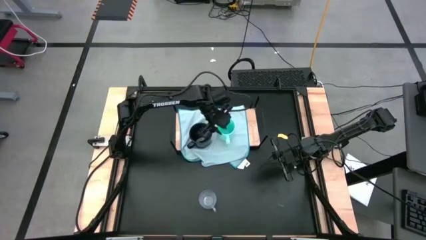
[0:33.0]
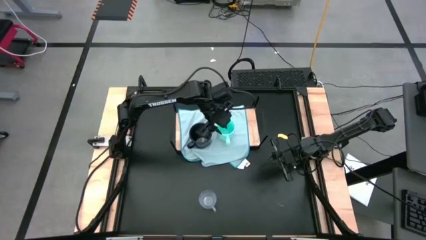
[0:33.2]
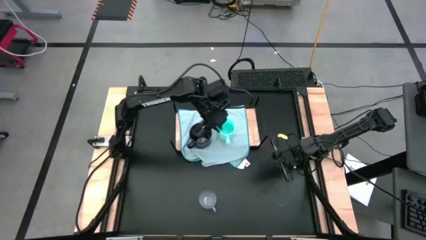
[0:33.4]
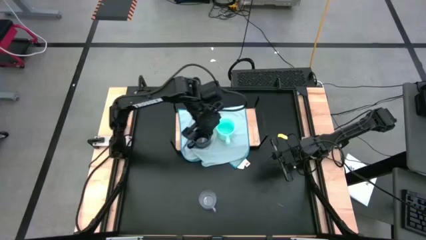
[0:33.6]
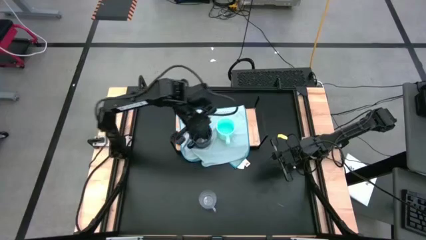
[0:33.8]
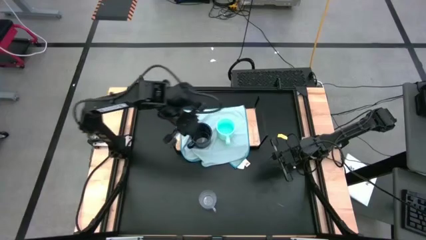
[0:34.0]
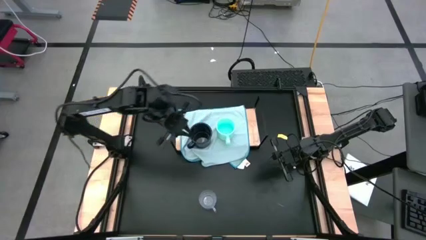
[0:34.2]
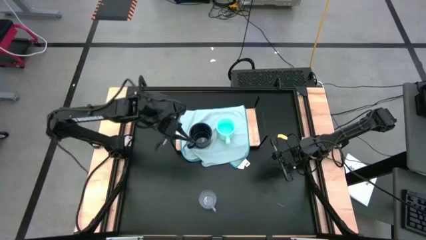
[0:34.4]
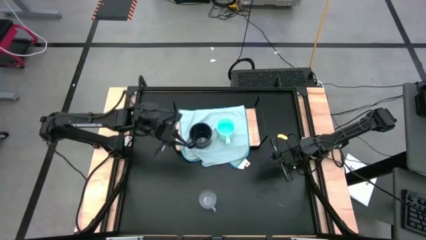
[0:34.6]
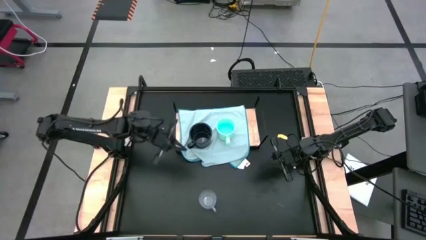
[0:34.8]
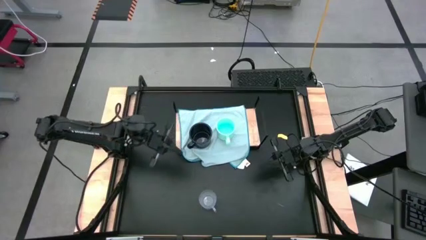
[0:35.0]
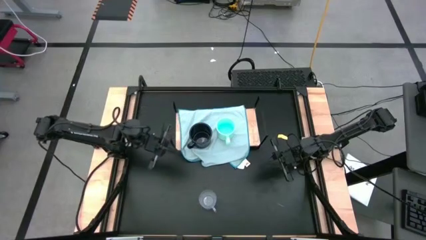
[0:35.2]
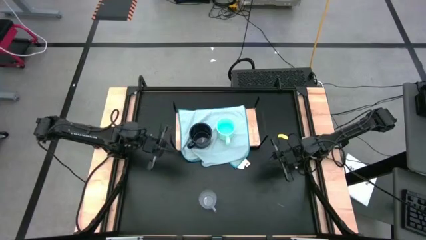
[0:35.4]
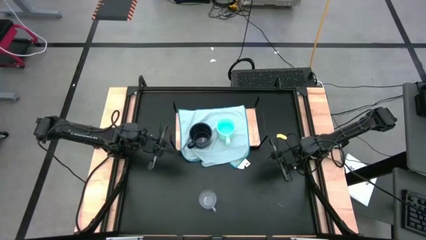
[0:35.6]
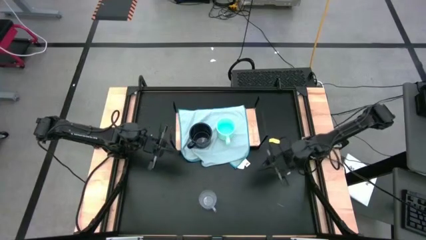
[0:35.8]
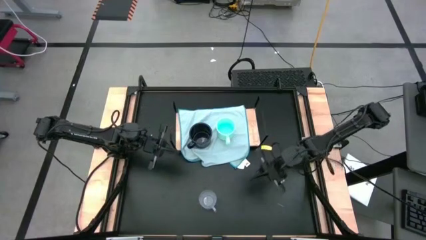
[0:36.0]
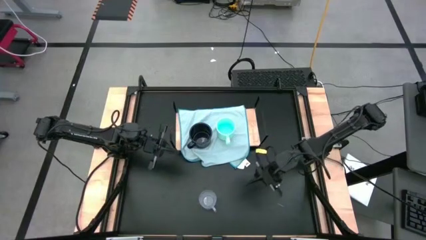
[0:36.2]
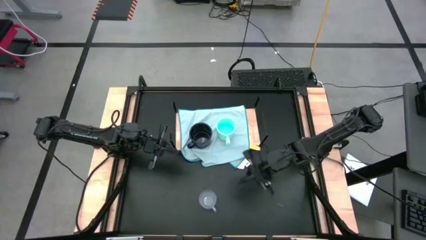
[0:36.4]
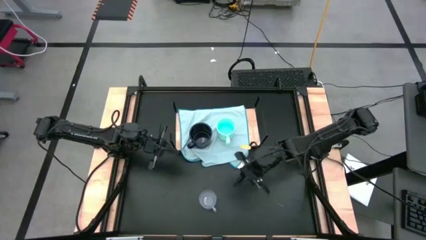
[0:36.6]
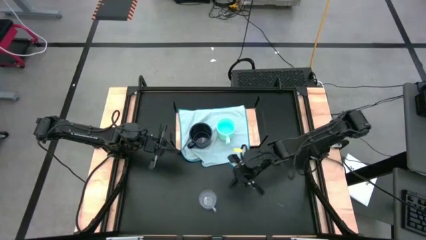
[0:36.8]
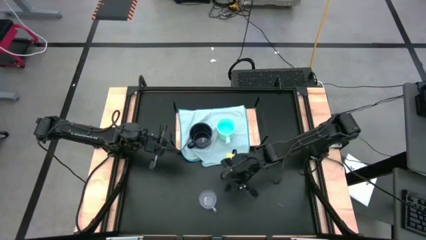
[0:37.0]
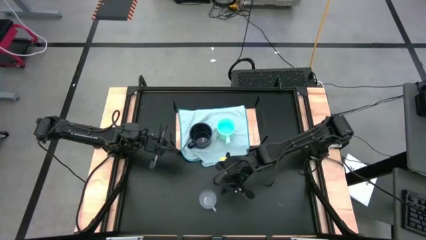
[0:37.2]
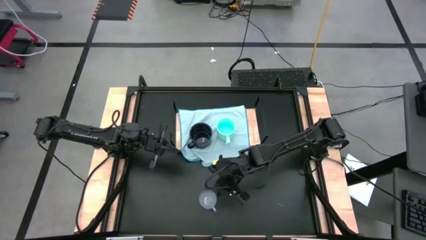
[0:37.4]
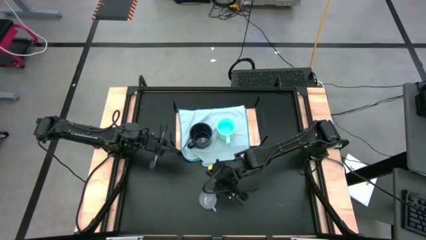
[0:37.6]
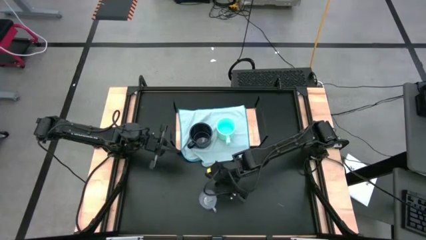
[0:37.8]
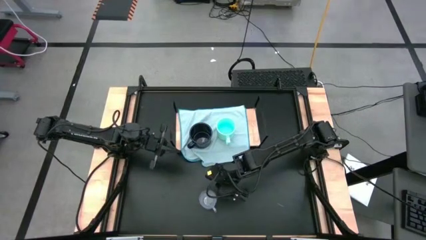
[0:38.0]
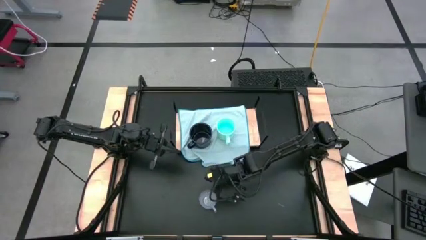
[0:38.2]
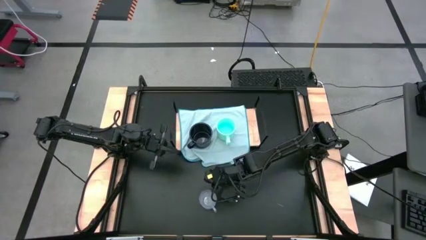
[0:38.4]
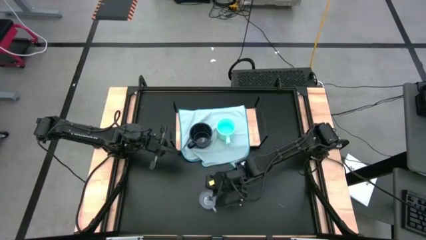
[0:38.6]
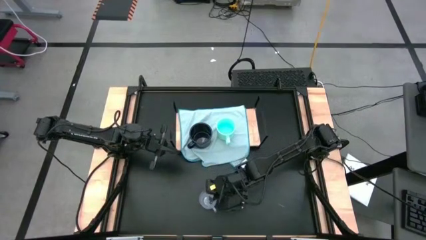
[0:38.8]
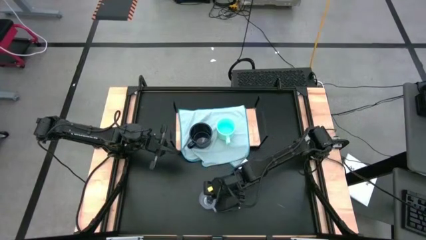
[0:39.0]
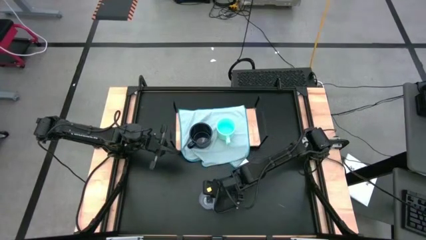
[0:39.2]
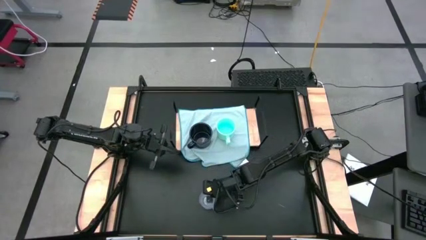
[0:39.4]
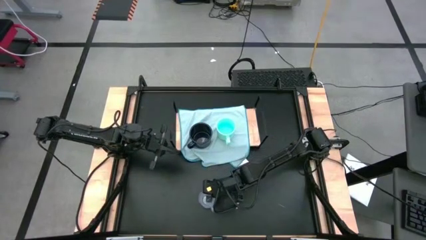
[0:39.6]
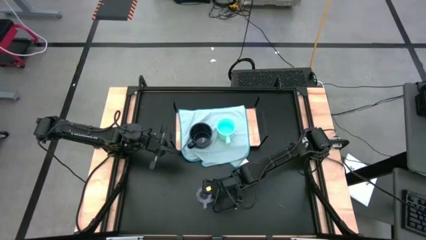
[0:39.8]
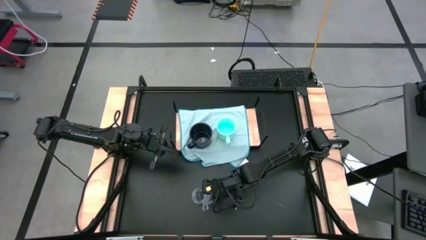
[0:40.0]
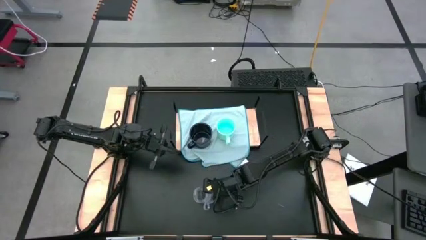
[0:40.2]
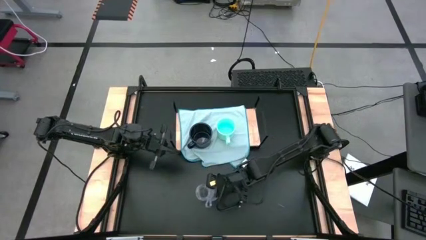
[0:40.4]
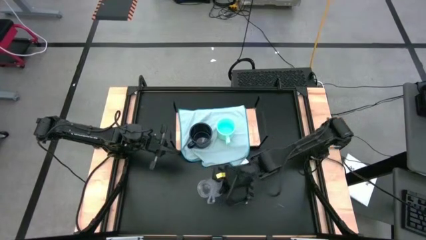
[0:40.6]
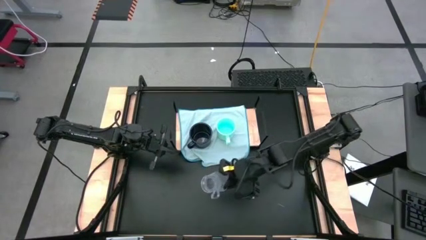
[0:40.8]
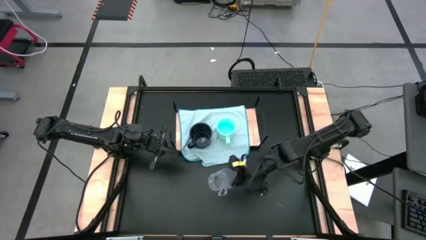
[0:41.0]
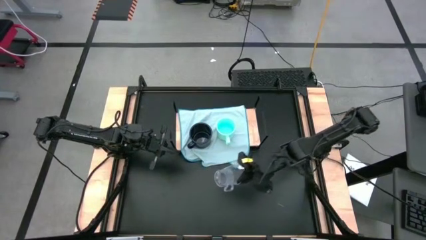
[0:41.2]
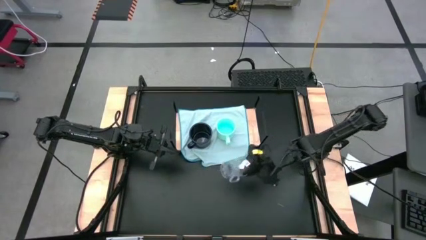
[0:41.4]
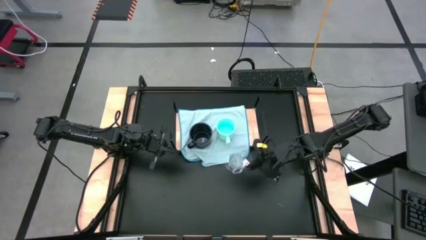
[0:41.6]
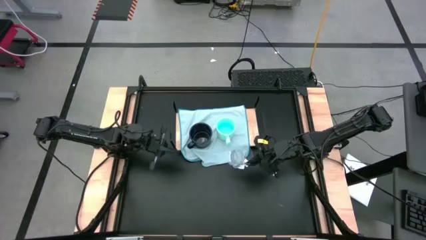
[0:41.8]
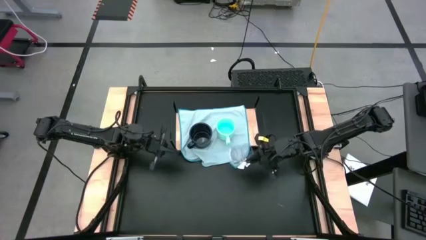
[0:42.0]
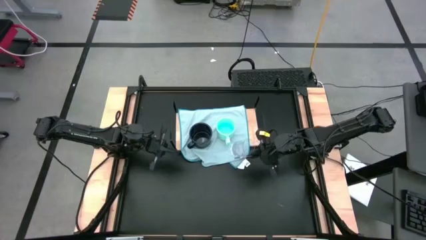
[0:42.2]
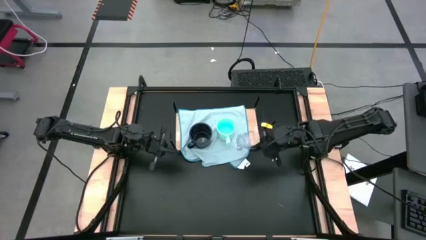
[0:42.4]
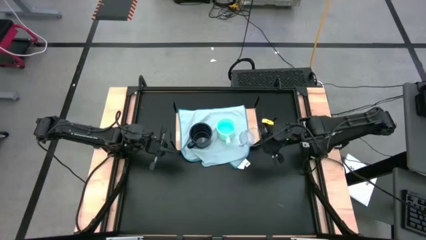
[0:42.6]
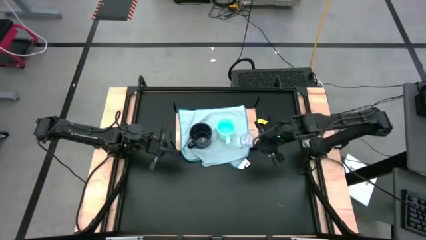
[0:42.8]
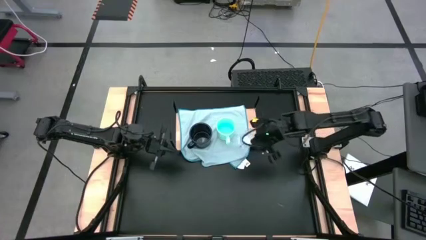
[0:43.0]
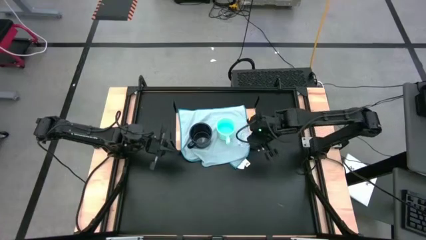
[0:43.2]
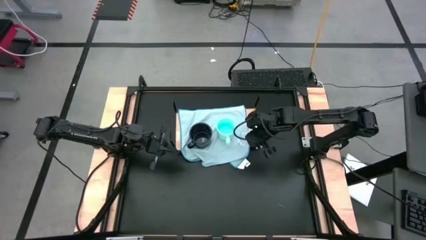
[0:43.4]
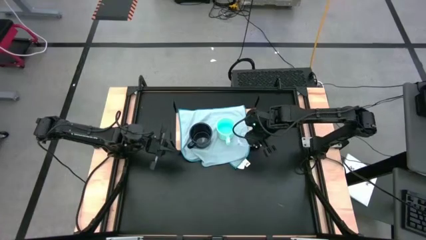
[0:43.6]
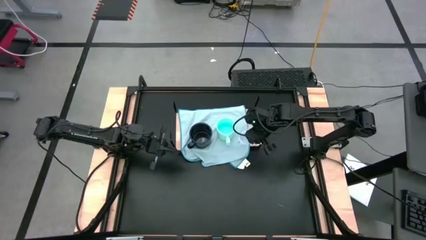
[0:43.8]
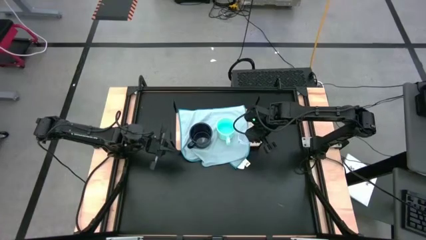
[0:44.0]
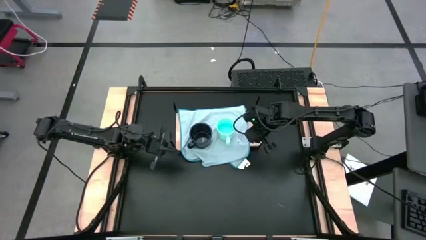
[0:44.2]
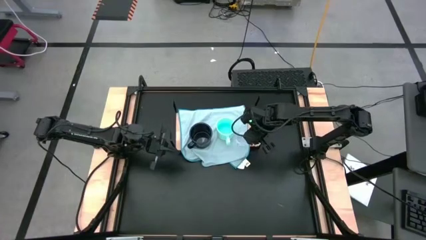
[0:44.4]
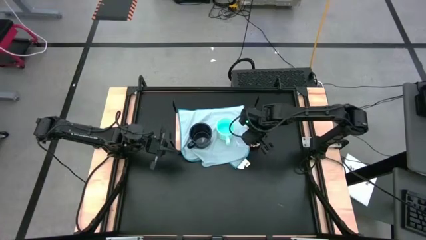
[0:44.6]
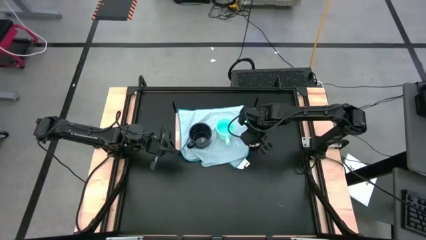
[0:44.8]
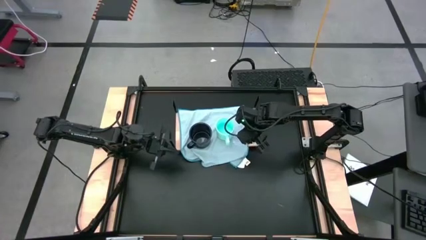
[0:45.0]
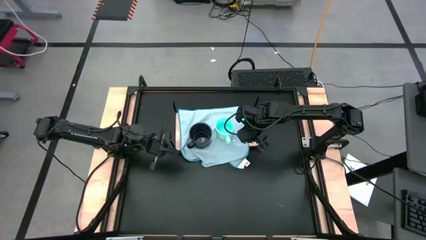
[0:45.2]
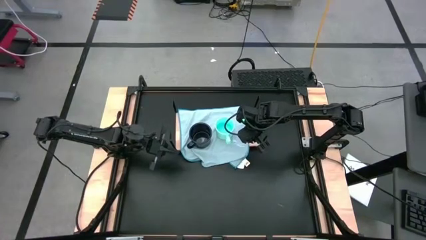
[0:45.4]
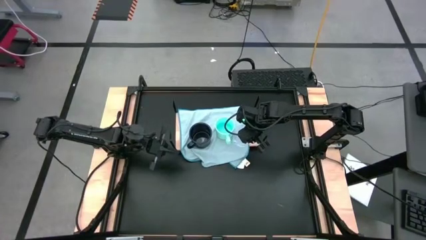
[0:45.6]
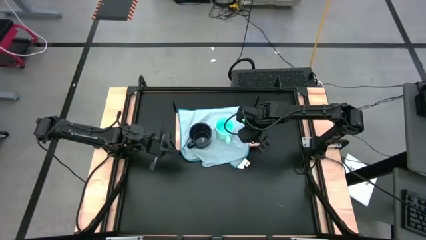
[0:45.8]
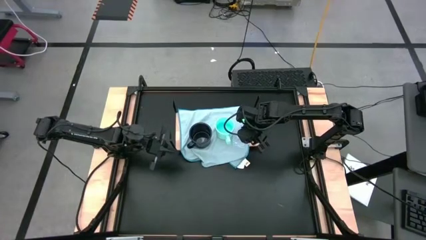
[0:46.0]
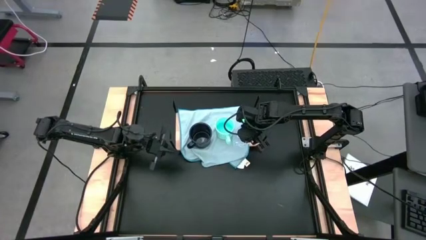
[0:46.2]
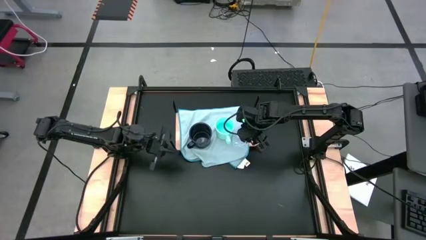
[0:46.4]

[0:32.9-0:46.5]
Task: Stack small to large cups/mugs on shelf
Put the transparent mug on the microfiber cloth on the shelf
